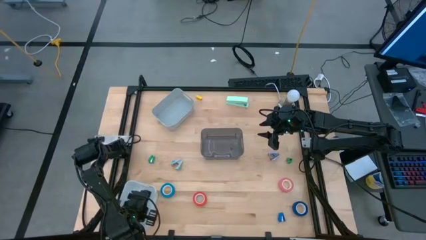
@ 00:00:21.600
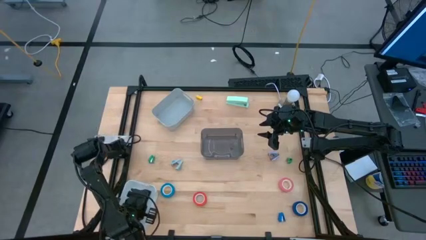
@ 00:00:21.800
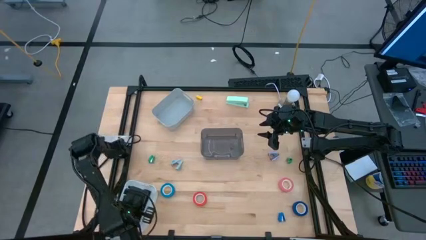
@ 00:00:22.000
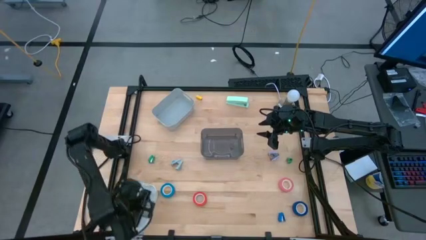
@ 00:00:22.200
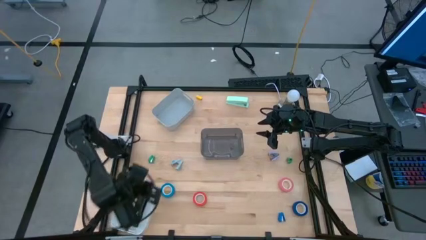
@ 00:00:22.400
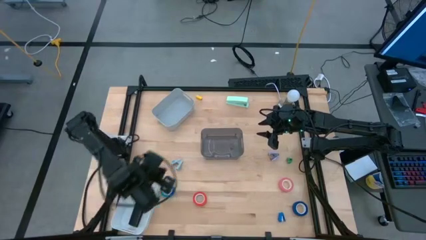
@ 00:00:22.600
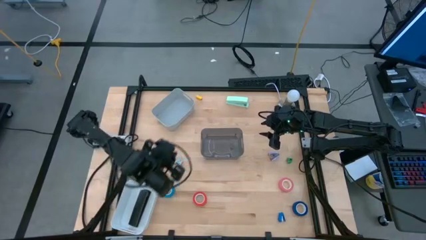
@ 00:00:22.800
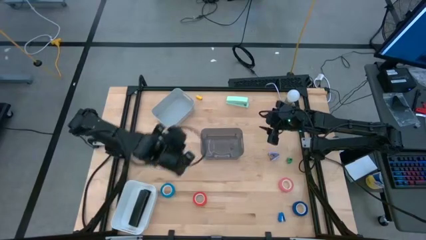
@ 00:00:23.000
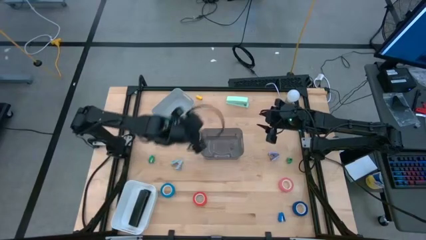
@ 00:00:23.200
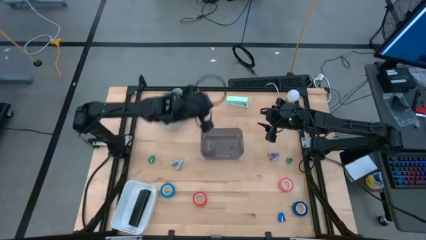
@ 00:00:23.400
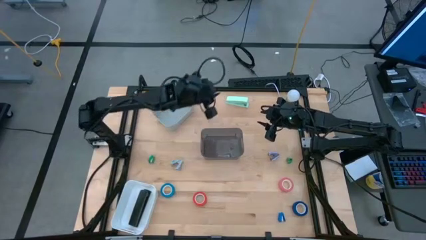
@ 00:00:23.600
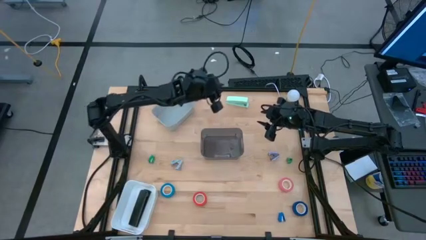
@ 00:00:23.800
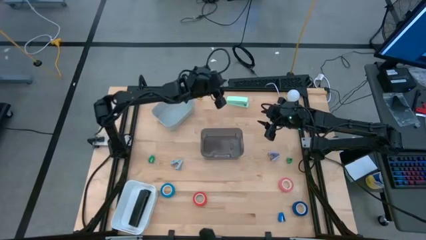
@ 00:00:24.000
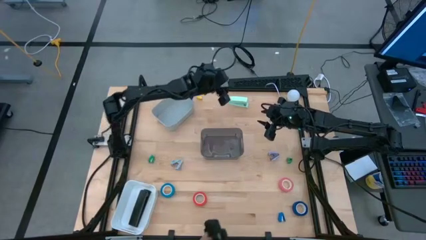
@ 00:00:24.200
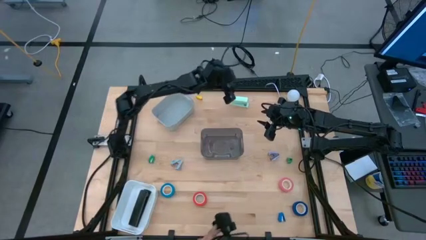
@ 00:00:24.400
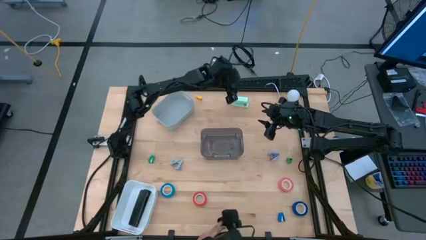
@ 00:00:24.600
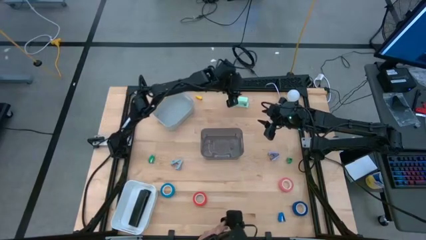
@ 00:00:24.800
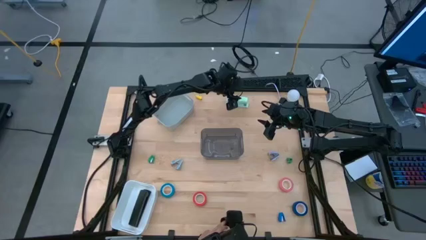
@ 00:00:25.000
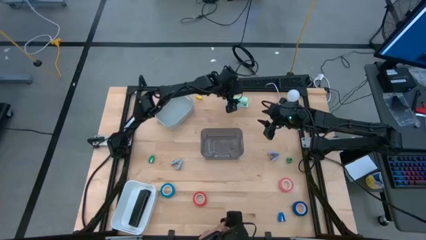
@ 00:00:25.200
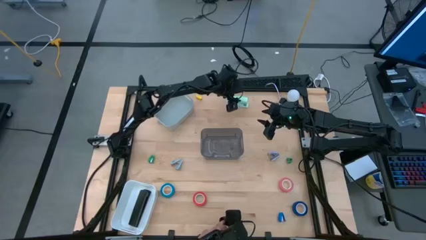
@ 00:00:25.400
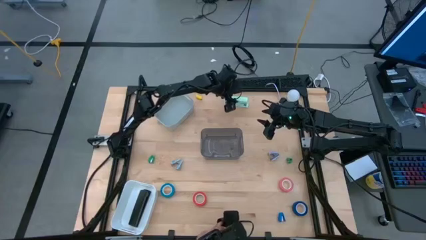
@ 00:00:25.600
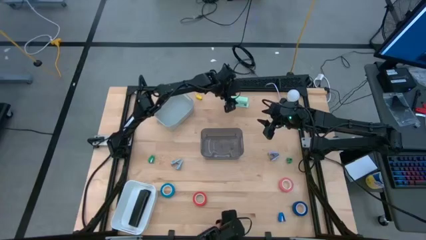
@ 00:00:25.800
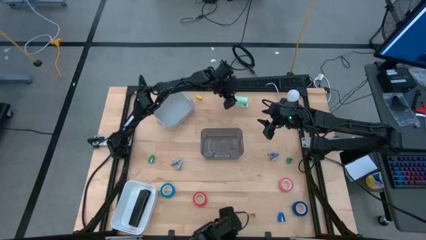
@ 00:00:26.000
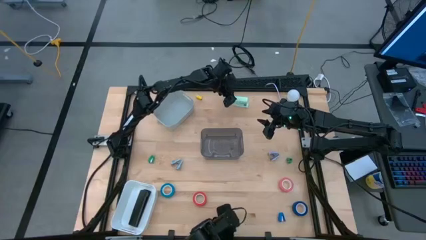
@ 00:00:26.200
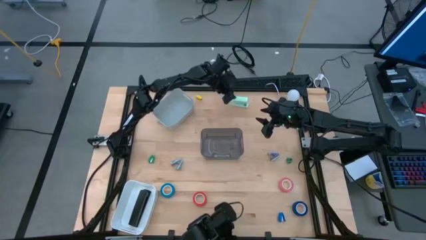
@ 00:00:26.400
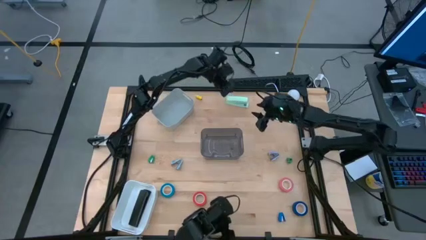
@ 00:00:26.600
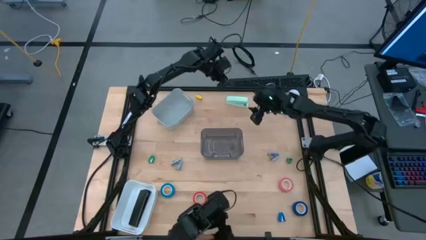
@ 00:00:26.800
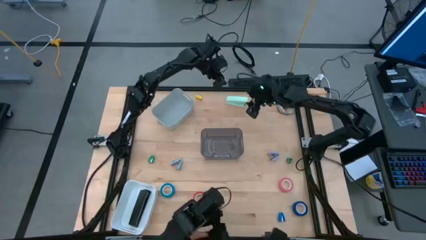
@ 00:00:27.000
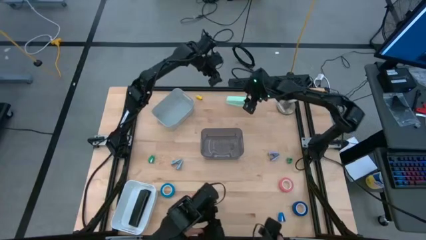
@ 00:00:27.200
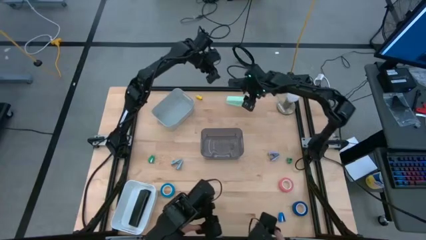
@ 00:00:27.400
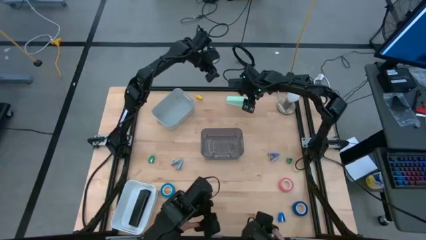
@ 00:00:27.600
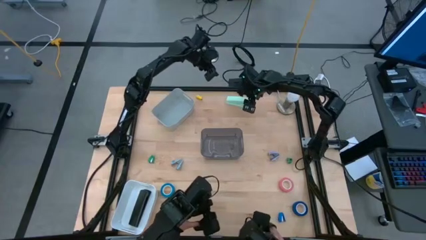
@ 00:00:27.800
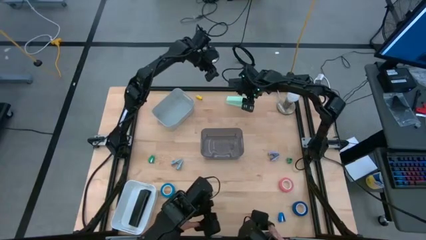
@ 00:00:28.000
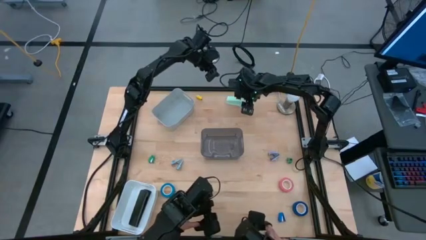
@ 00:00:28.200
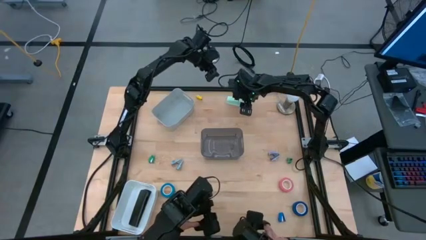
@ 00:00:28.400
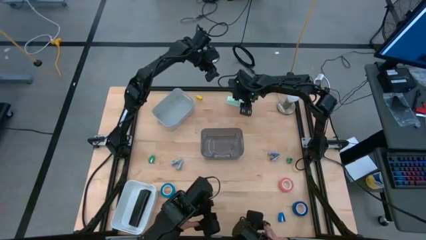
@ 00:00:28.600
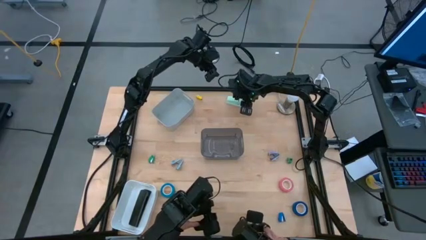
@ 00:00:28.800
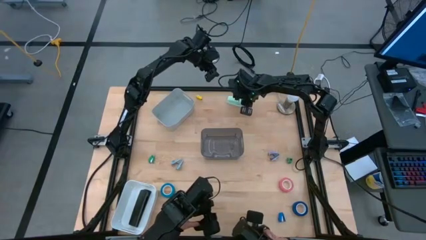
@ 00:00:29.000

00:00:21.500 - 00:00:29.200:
Task: Pick and place Stapler, Stapler remover, tape
Put the light green stapler into the white bin

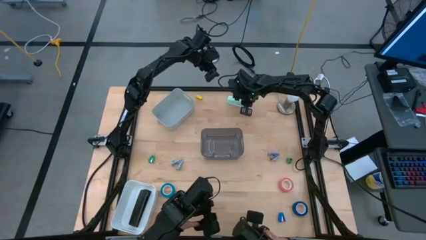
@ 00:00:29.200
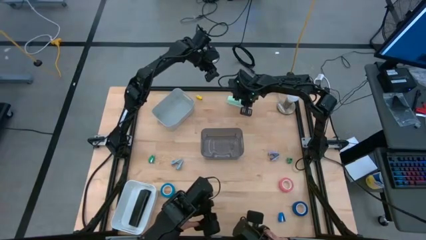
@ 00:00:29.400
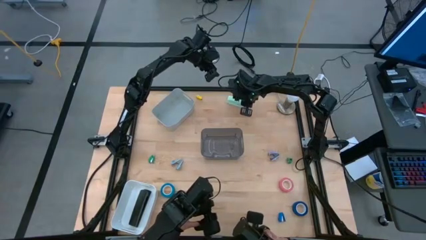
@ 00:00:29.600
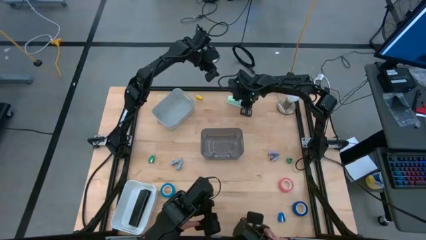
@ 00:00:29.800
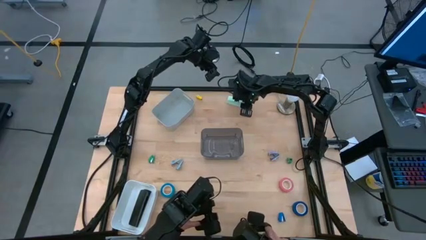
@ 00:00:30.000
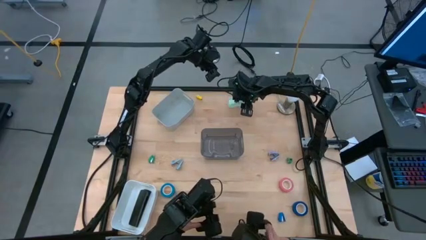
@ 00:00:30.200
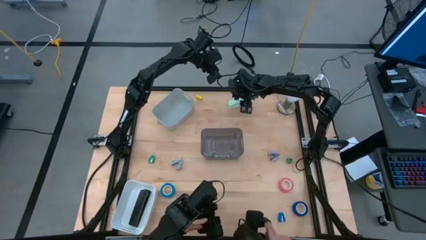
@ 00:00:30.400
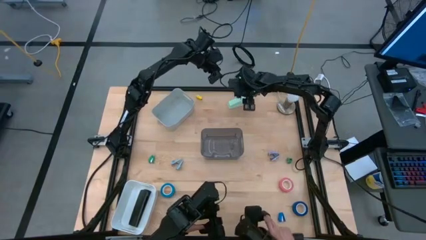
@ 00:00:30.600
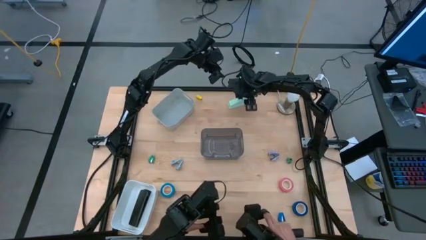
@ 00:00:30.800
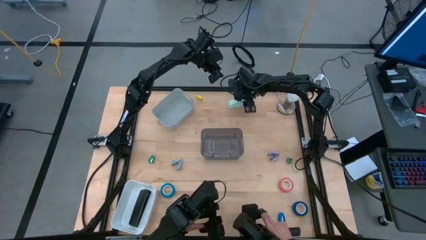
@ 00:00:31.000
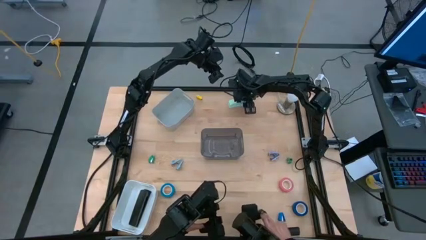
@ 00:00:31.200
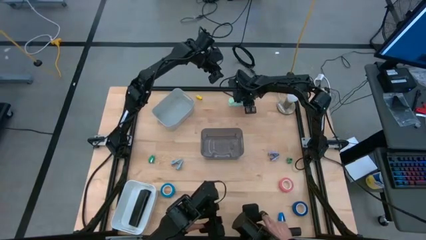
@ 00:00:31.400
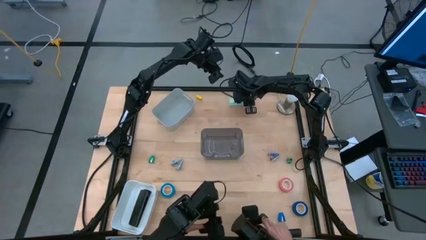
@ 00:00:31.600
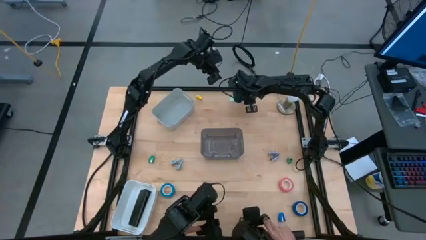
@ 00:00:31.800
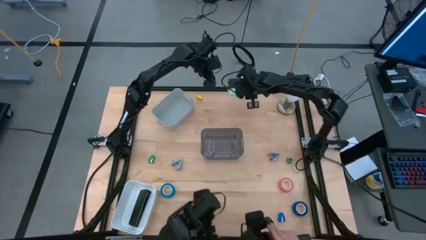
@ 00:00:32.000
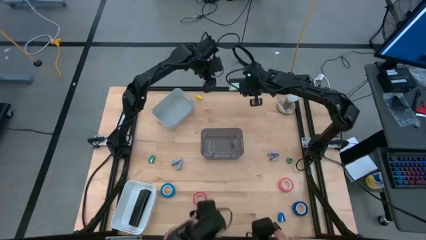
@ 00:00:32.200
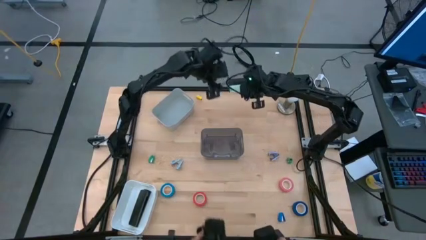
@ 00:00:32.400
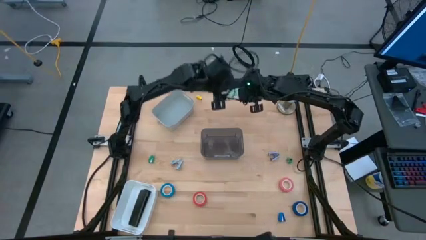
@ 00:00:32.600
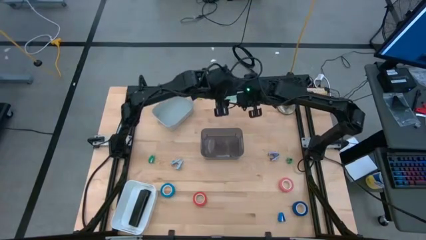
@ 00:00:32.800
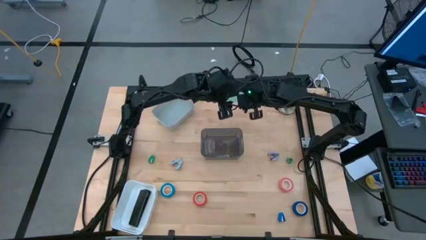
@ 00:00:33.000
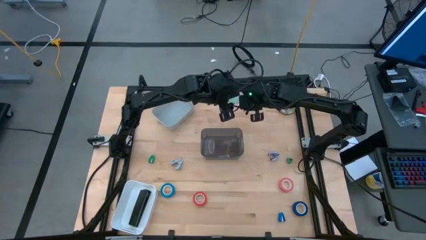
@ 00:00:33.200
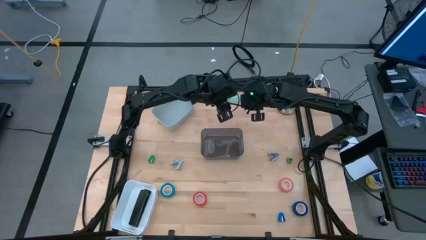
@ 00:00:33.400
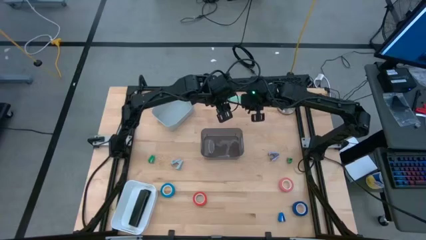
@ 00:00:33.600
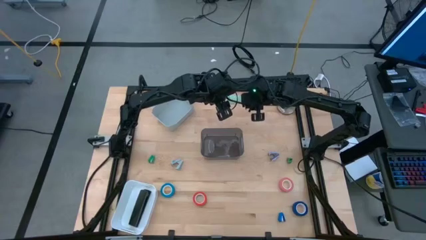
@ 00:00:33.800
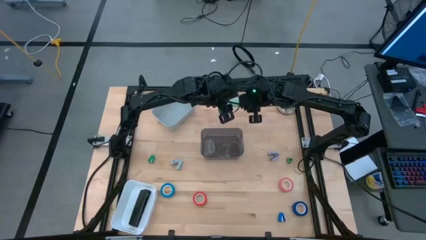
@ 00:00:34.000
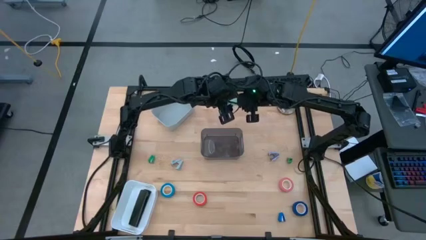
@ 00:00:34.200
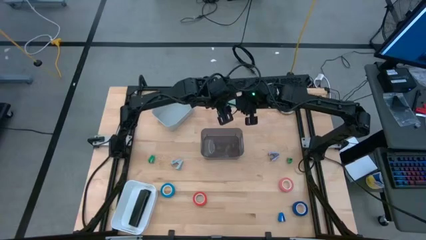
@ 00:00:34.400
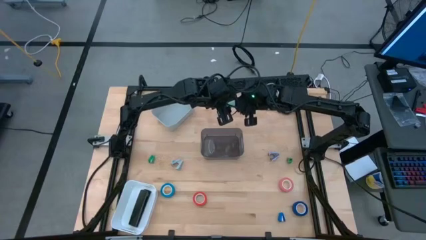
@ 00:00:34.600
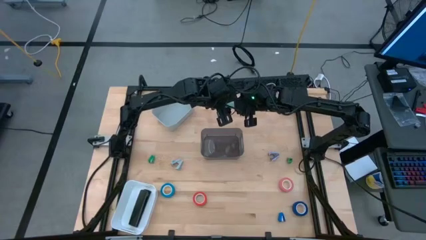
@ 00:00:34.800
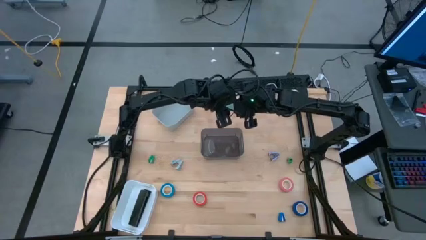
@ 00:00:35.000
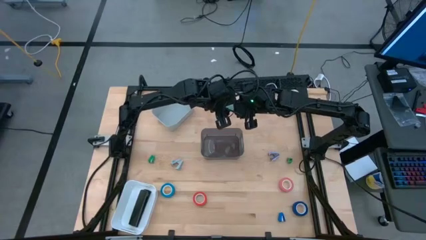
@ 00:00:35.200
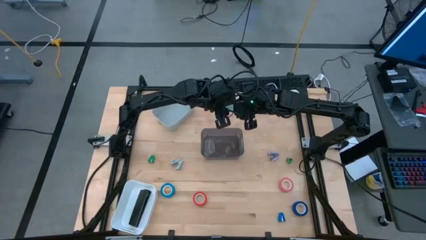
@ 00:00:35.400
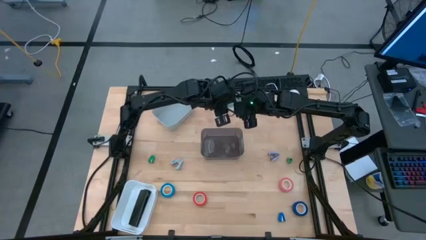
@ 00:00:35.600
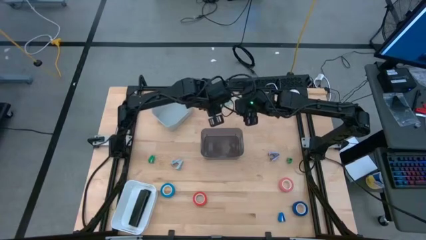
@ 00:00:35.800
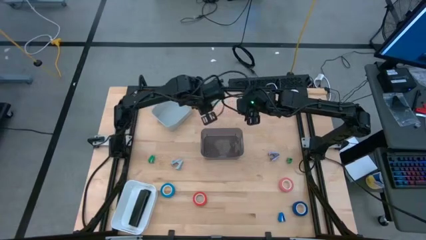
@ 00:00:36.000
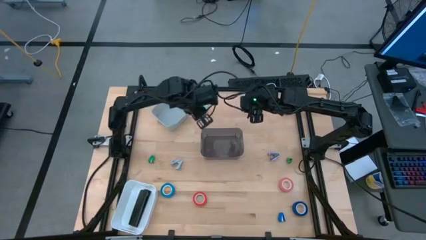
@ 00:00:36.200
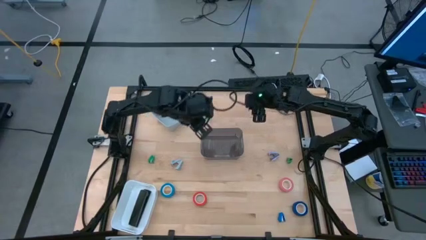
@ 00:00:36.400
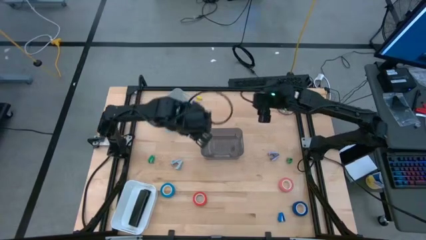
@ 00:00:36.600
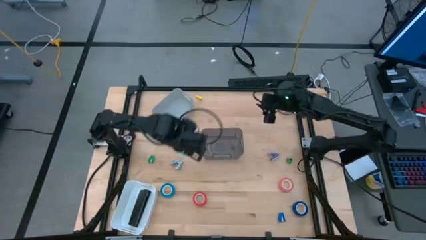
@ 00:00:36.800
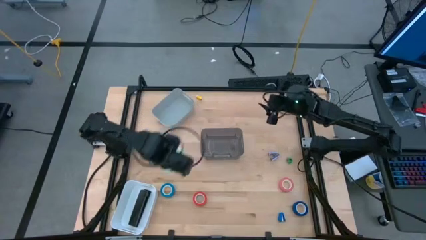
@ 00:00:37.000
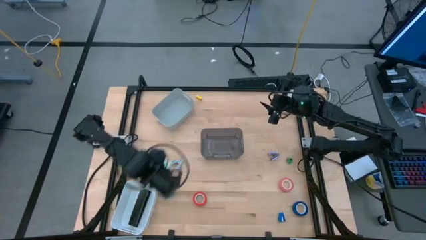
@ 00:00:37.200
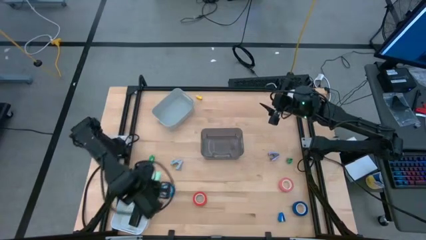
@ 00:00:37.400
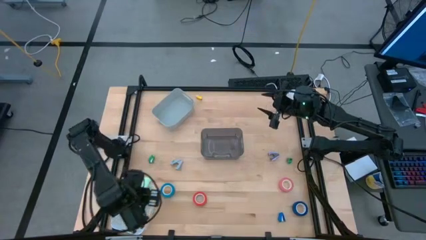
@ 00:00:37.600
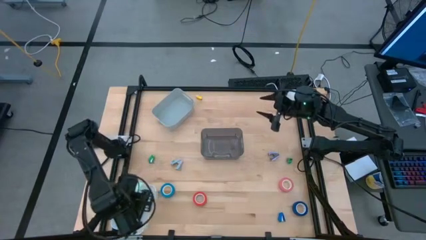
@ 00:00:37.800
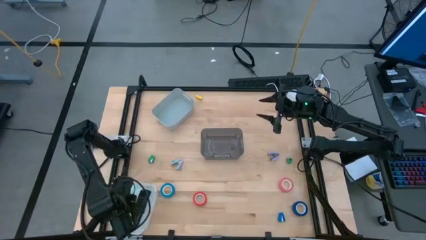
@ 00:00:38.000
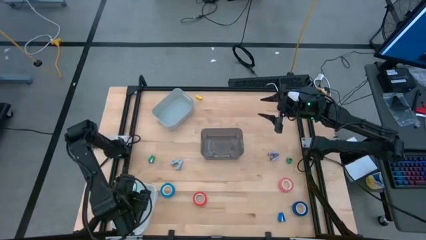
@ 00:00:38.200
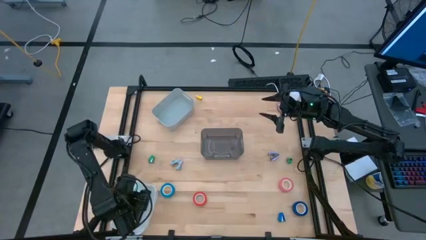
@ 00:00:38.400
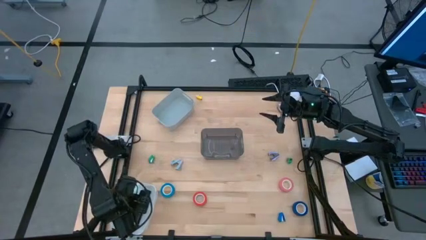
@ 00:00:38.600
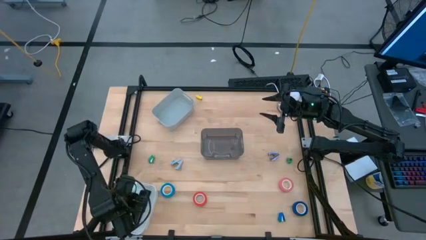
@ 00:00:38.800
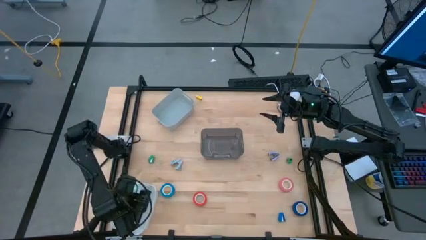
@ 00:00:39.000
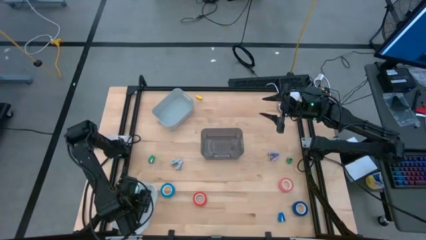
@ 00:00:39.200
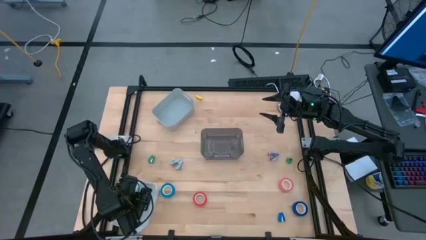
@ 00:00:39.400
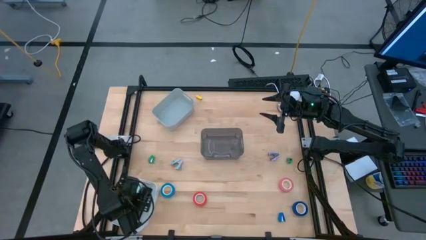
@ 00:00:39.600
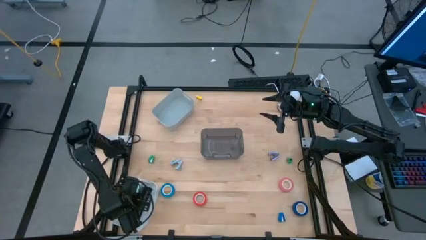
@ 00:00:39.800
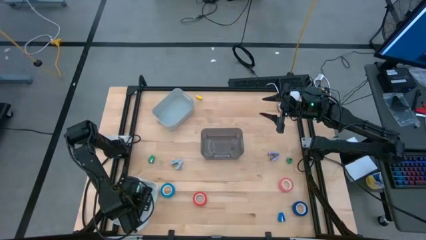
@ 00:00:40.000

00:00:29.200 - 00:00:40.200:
Put the light green stapler into the white bin
